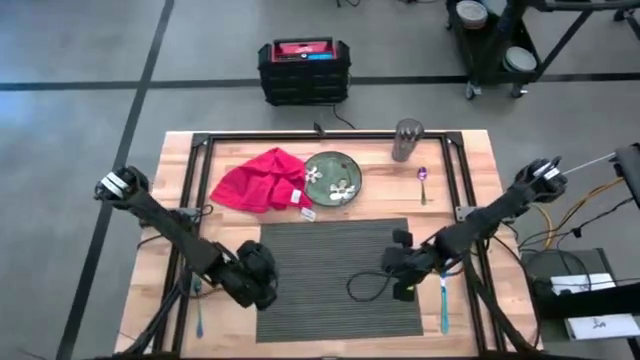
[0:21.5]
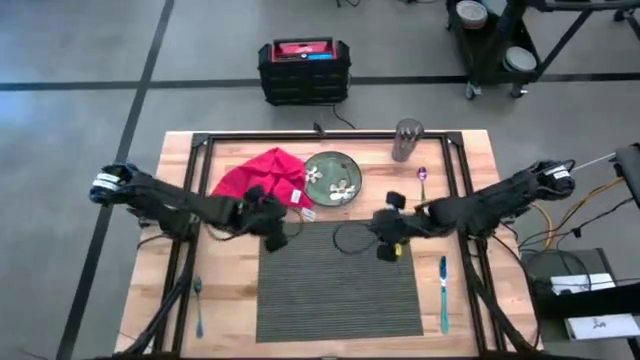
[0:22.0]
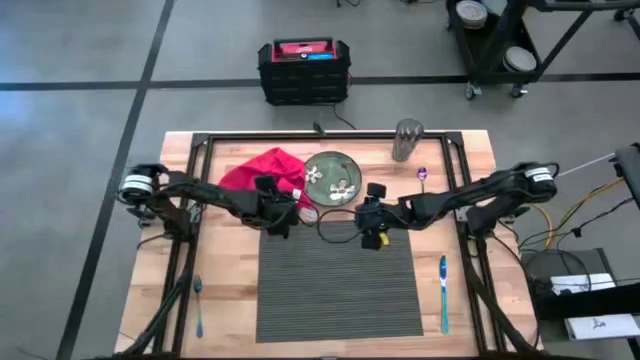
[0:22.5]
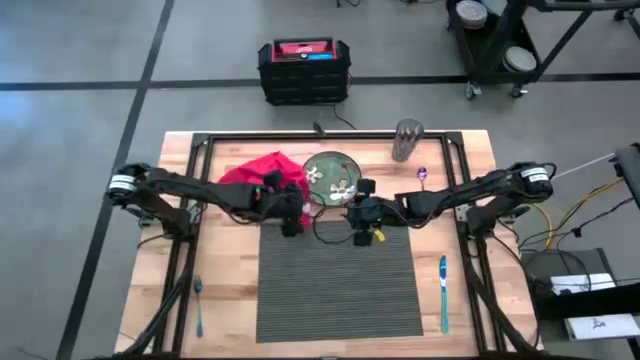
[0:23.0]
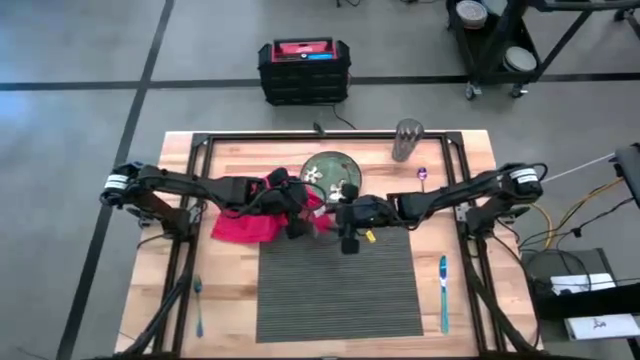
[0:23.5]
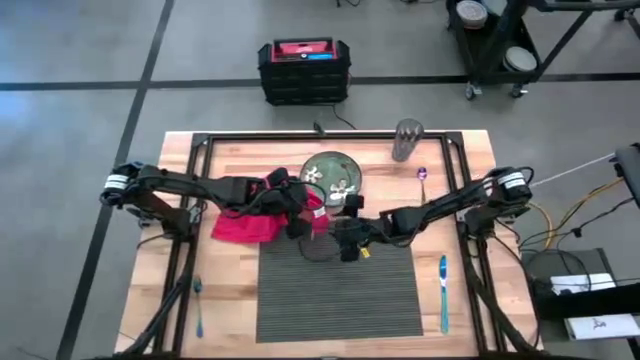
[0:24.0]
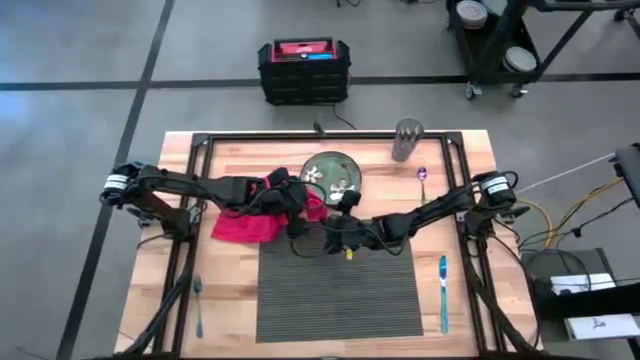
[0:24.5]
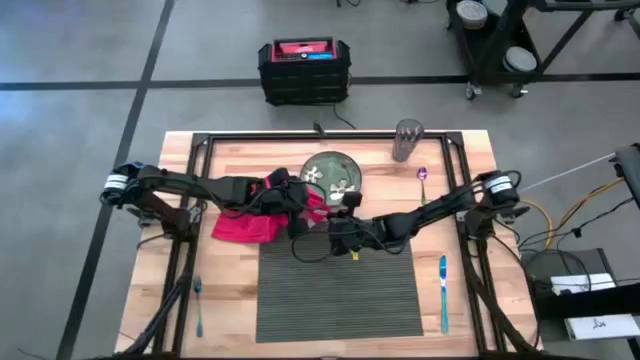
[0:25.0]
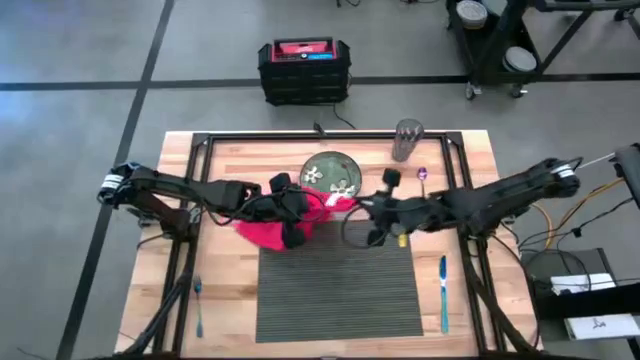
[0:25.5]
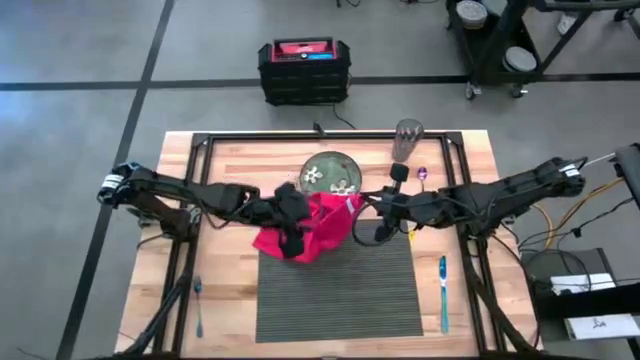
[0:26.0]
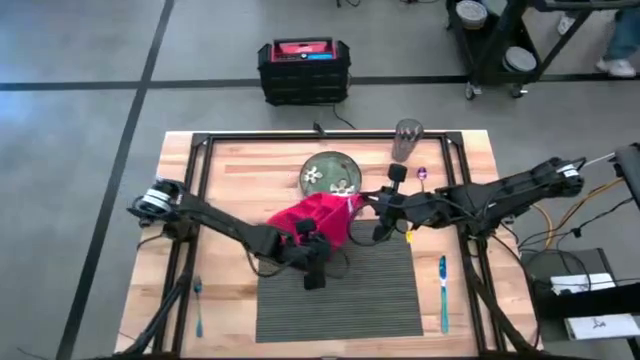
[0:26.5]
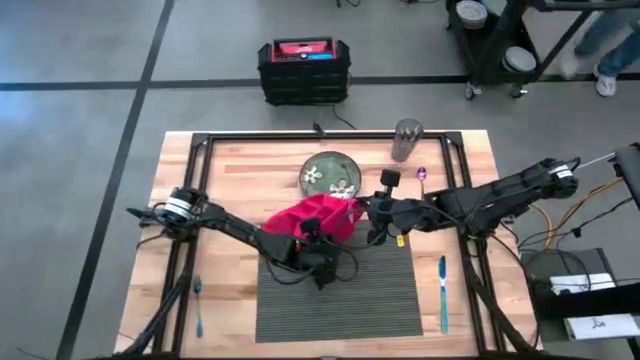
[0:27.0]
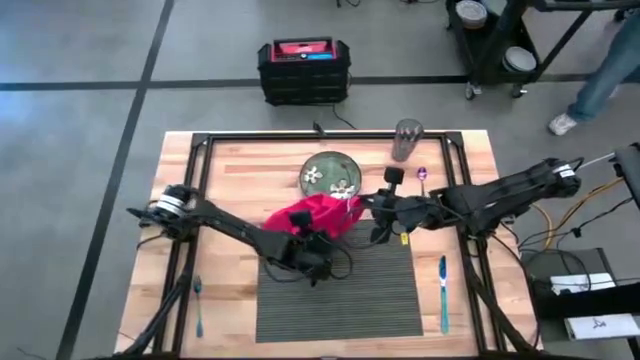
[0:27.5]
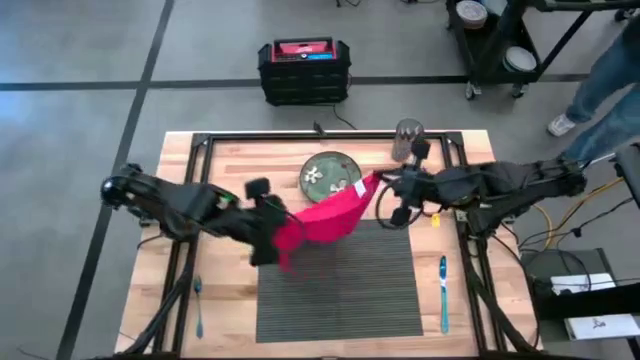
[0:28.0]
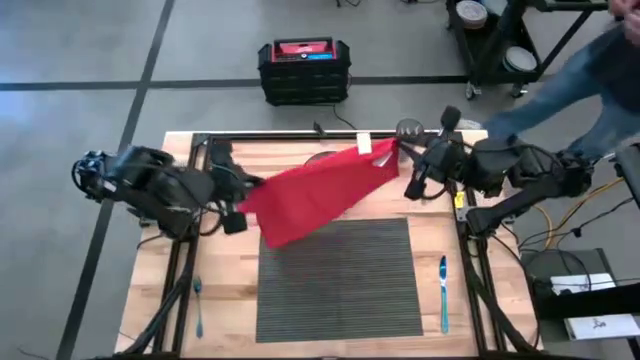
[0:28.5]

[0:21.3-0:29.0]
Task: Set table place
Fold the red table napkin

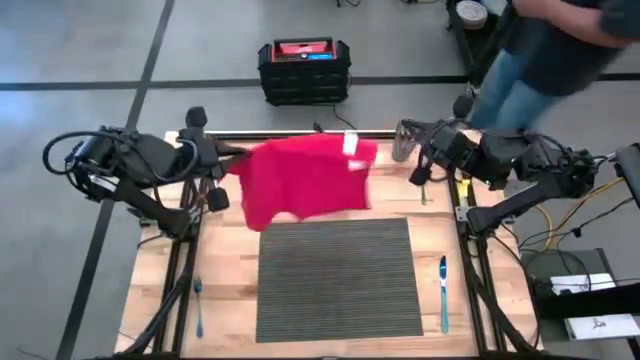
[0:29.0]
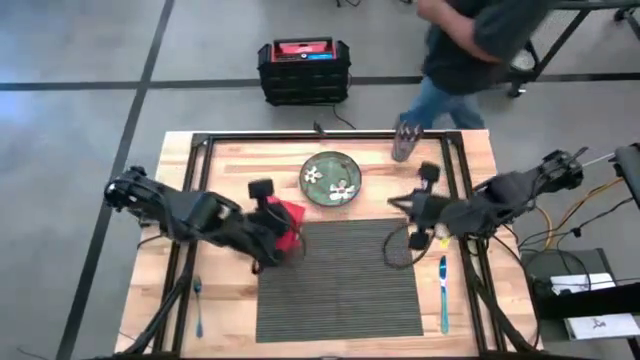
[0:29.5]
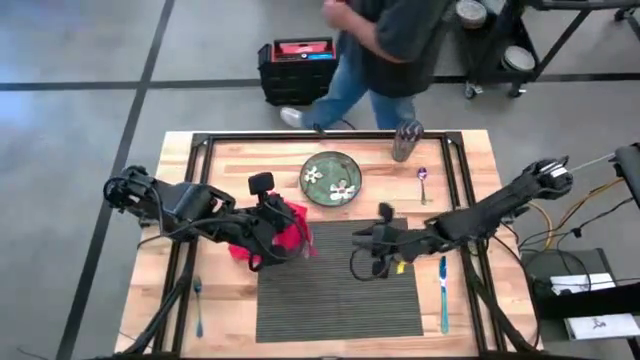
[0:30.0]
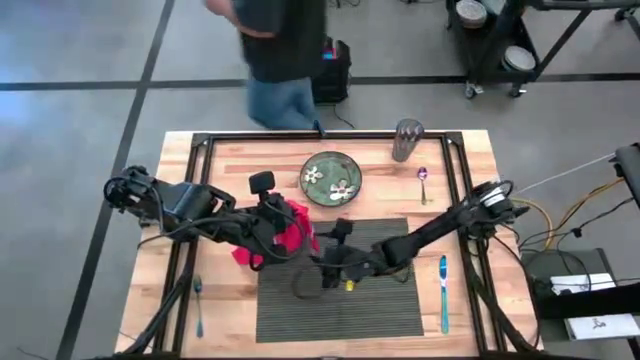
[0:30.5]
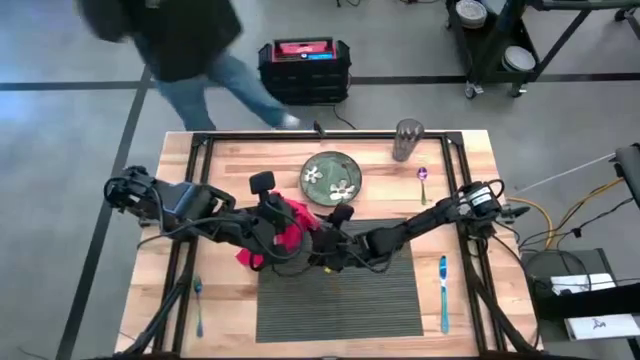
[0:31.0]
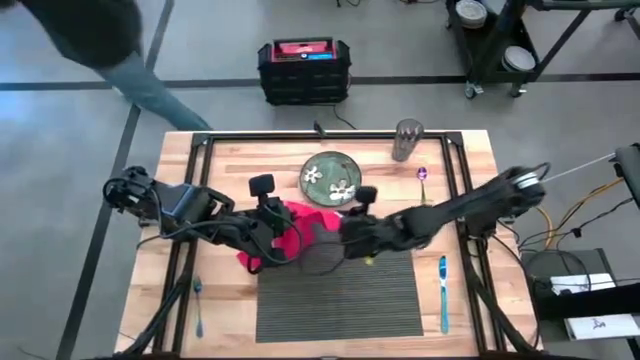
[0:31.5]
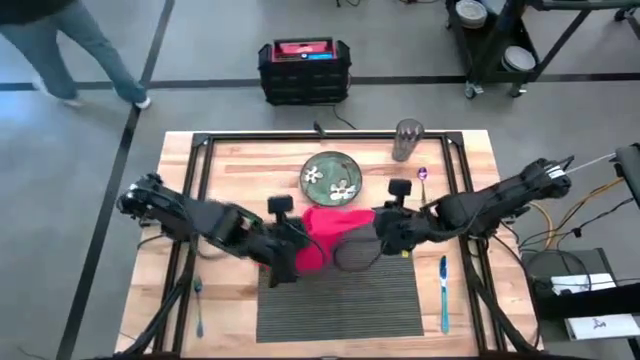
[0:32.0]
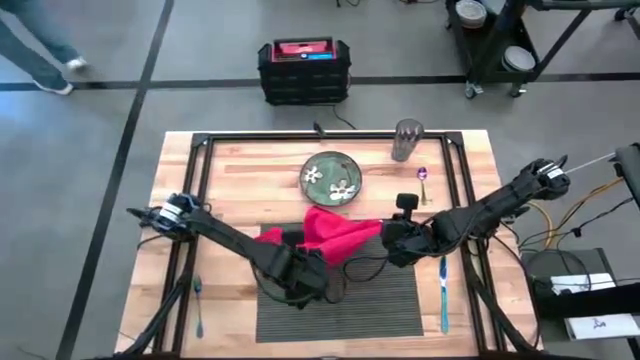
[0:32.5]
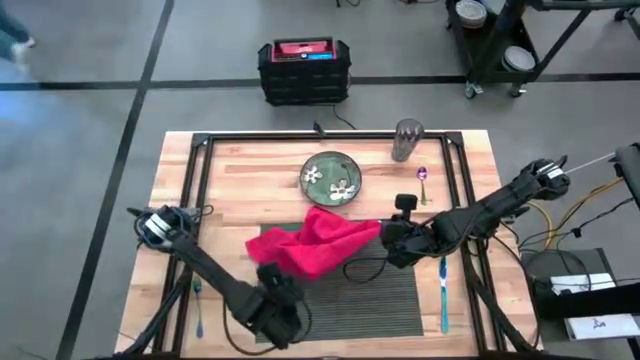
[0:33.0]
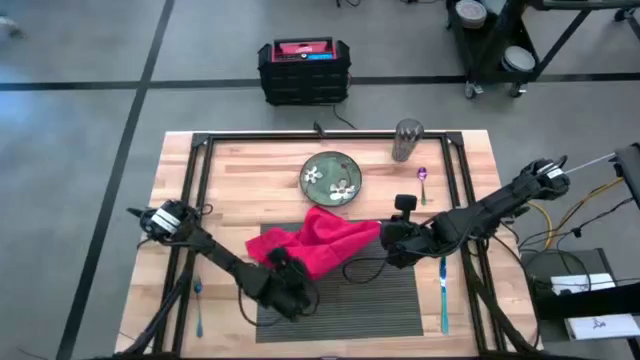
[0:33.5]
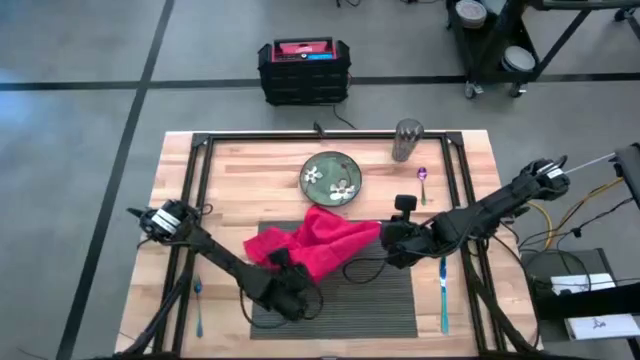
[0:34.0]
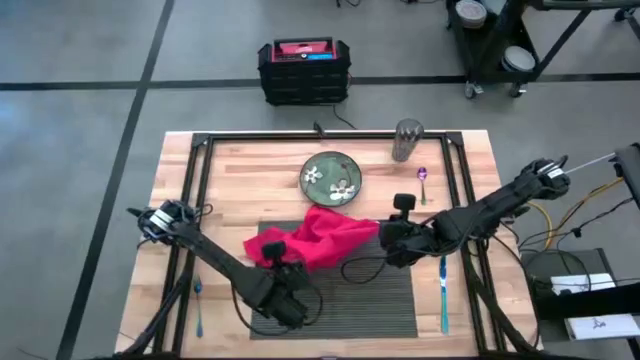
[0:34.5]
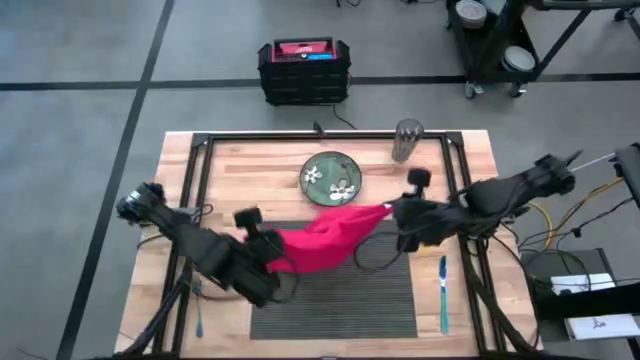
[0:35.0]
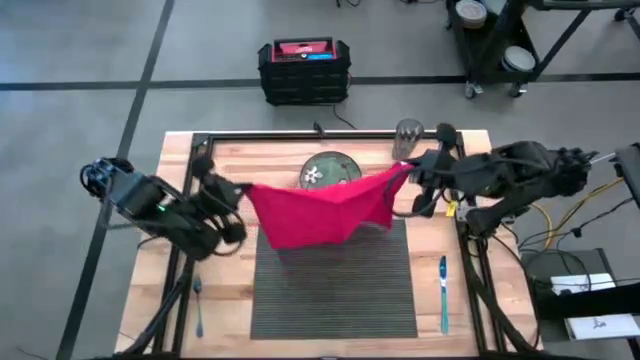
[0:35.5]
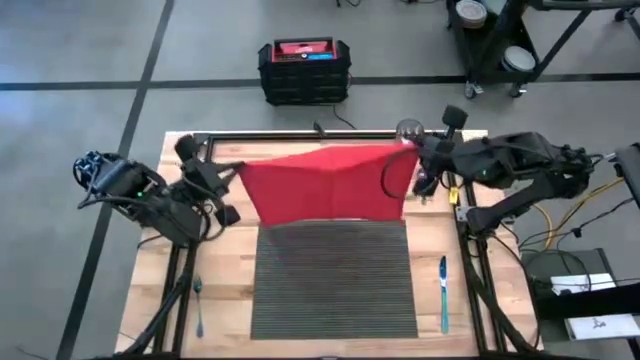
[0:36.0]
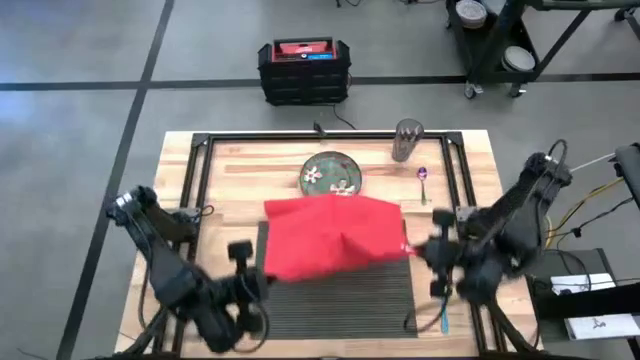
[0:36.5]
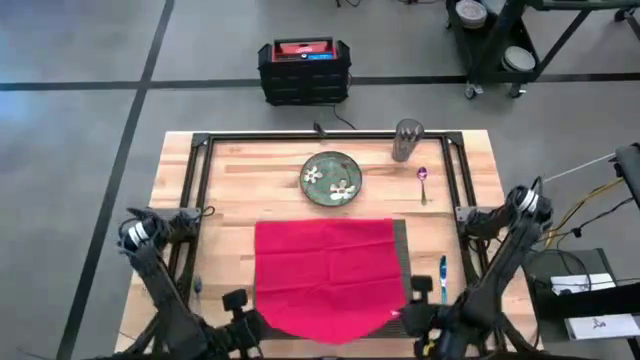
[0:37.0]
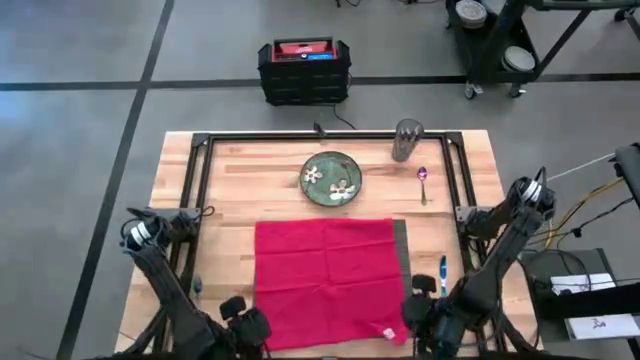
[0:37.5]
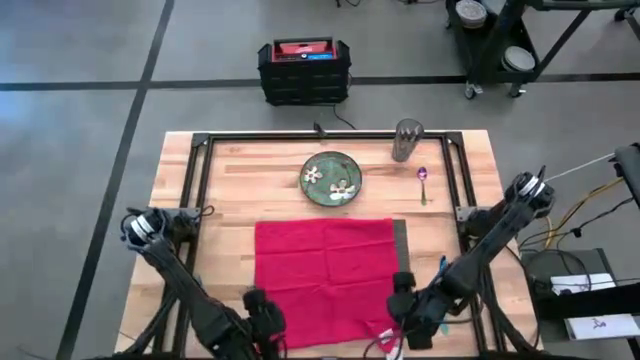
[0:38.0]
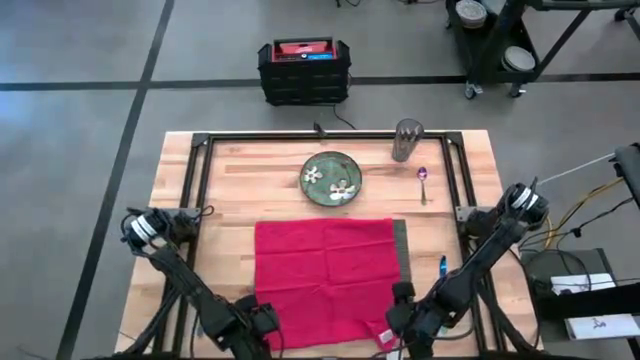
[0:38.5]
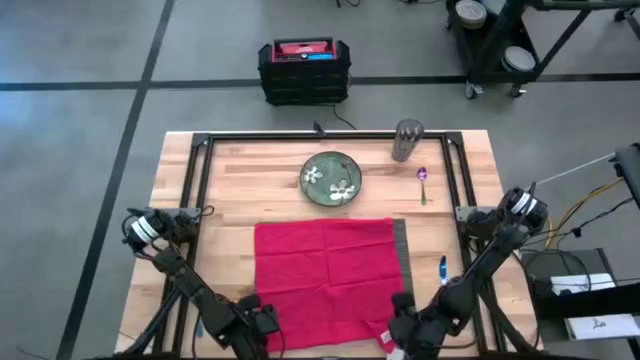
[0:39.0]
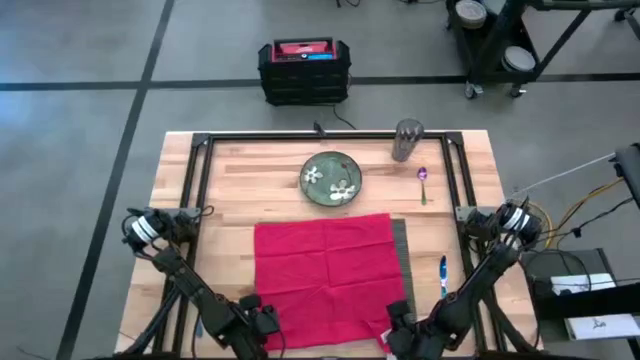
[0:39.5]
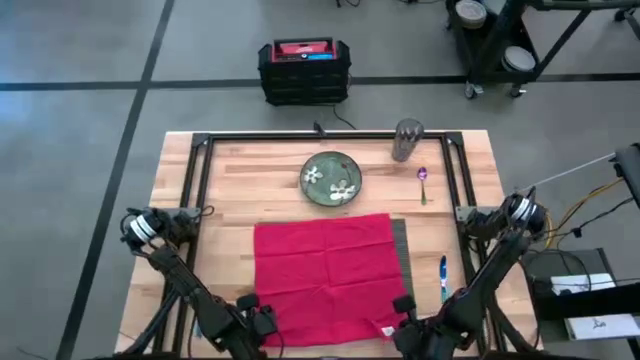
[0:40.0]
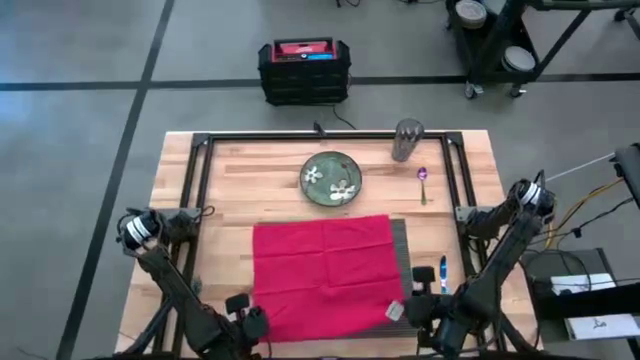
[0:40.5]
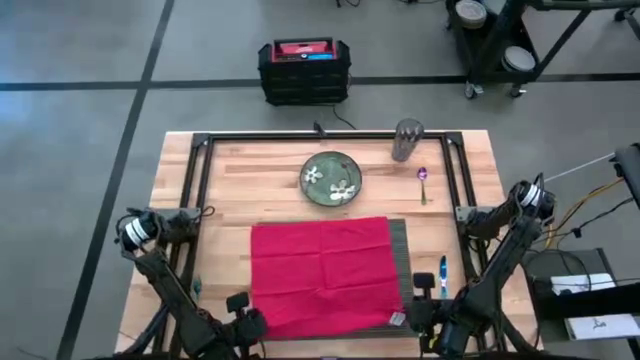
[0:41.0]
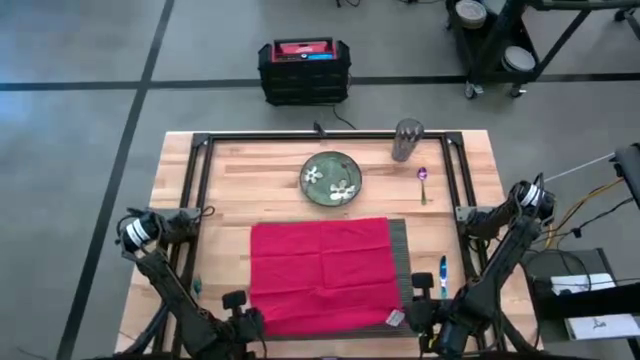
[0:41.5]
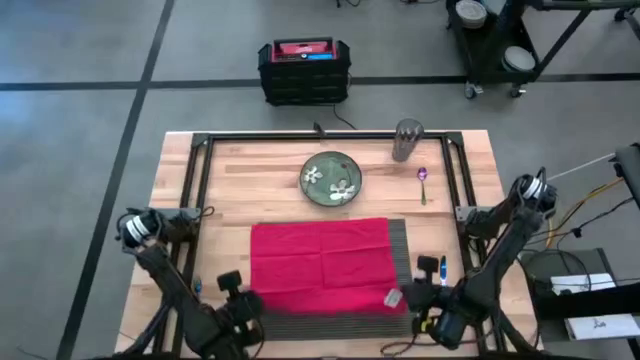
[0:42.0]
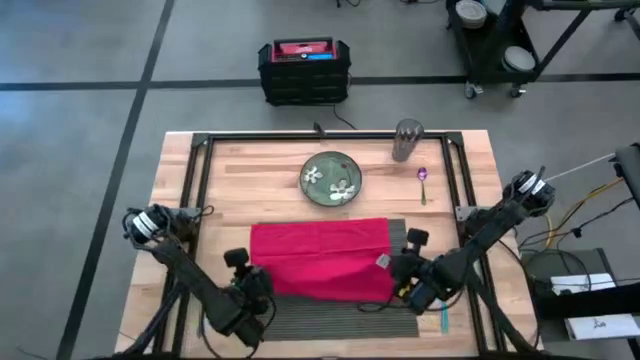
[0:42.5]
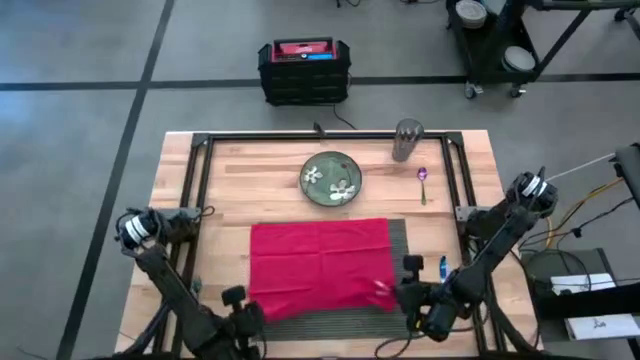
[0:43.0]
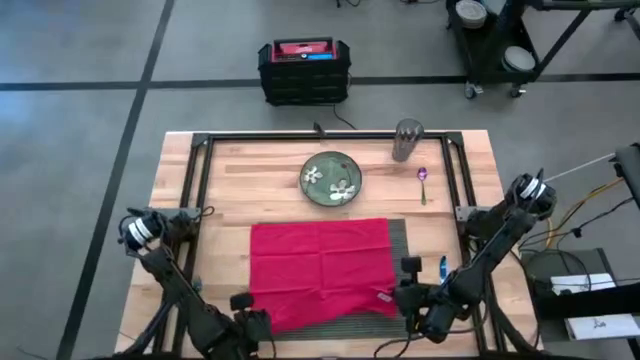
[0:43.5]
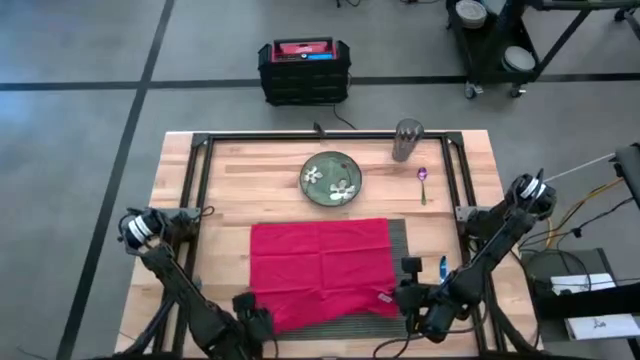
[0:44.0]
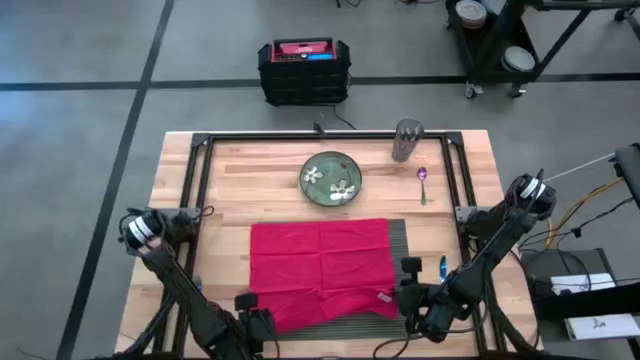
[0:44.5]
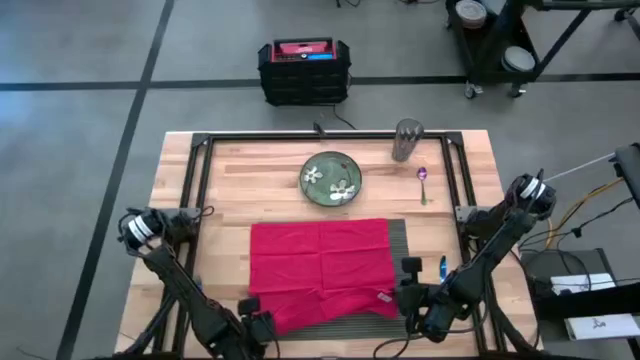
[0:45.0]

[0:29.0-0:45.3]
Fold the red table napkin
